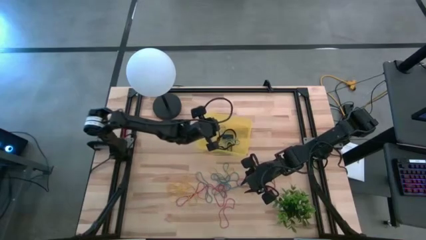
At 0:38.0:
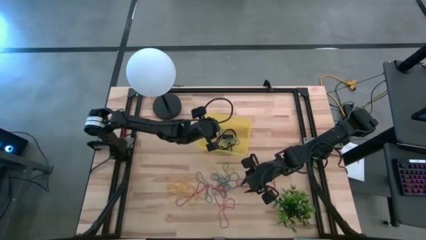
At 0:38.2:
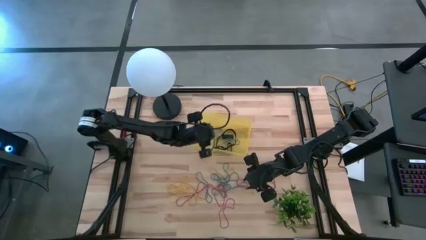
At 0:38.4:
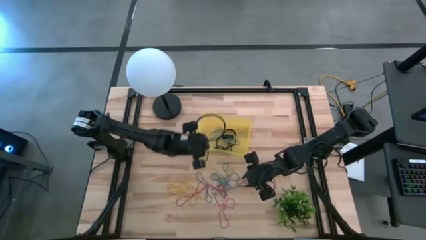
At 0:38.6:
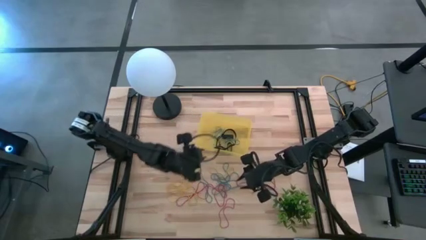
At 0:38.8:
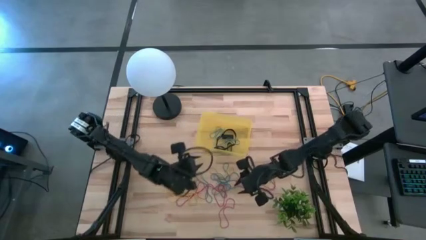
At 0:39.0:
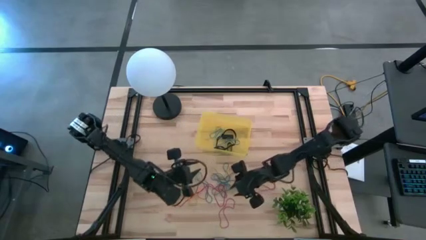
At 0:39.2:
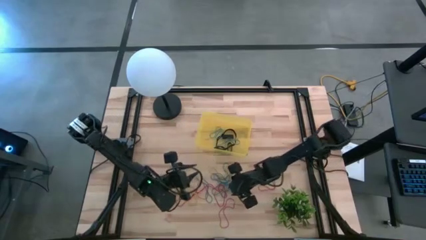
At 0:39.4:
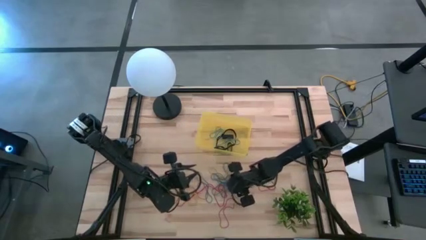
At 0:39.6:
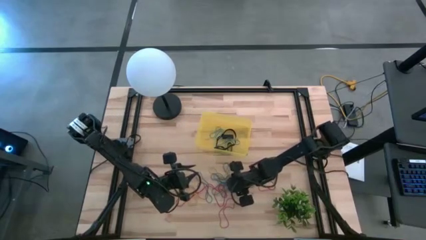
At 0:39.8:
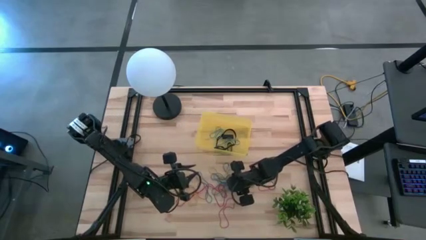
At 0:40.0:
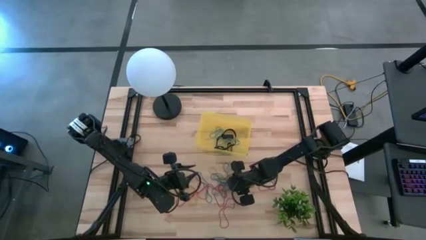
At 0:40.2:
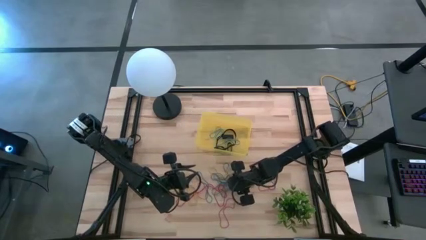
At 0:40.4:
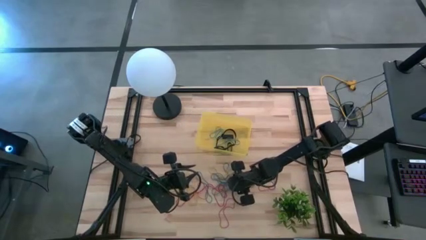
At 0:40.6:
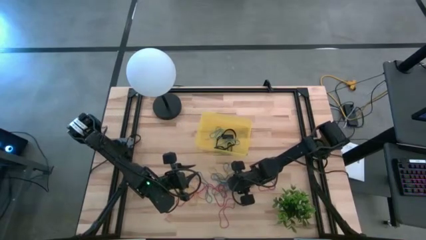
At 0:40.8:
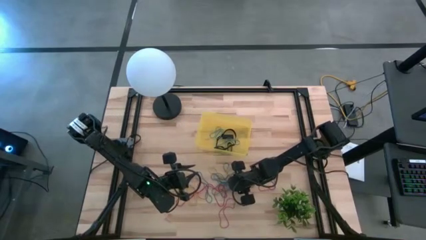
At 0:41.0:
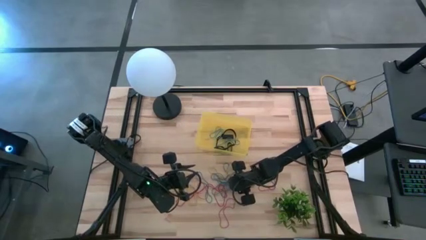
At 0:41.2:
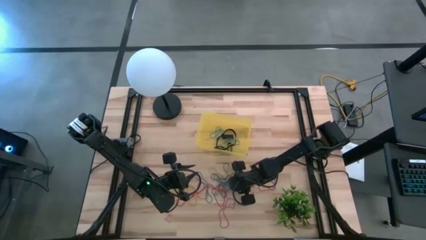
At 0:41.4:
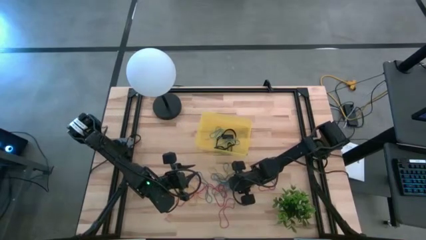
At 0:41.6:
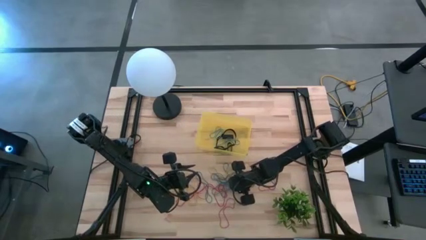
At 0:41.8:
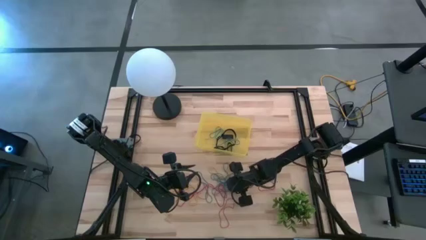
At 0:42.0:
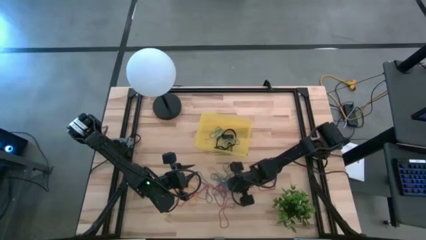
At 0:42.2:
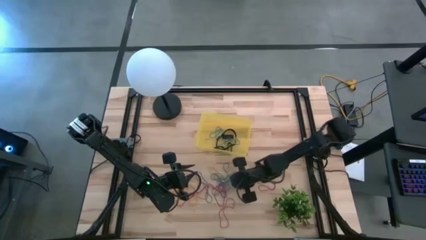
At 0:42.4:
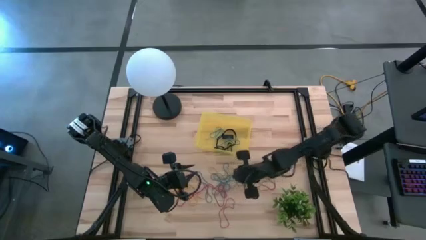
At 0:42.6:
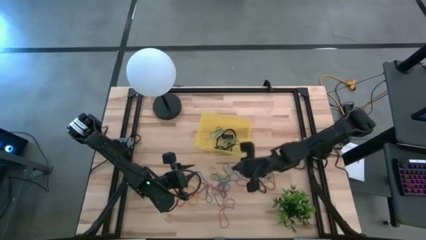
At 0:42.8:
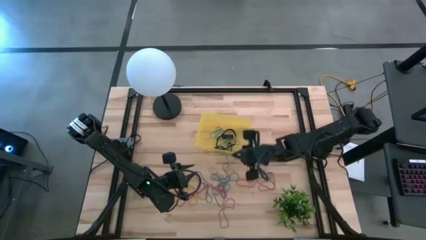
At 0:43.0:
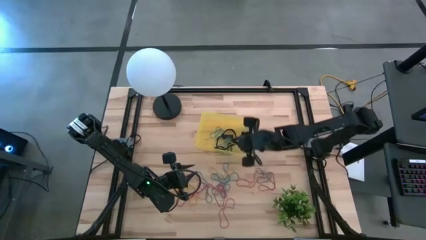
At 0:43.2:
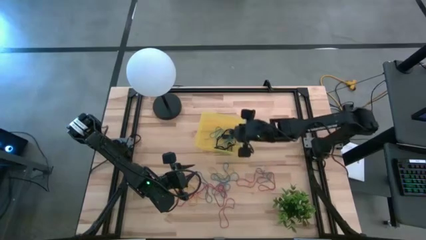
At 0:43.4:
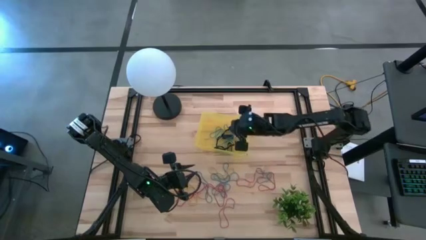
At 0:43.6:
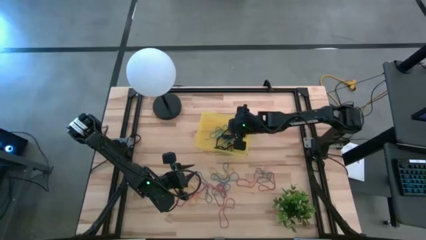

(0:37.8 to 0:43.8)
Task: Pick and place rubber bands into bin
Put the blue rubber band into the yellow bin

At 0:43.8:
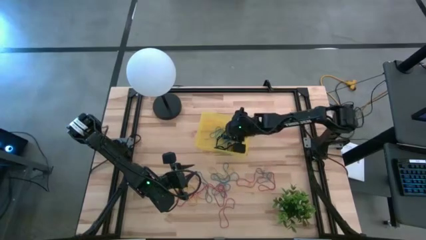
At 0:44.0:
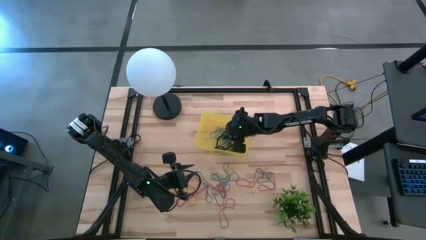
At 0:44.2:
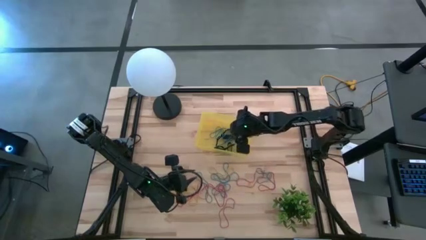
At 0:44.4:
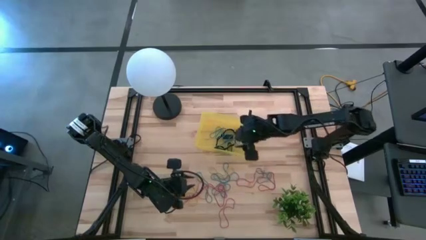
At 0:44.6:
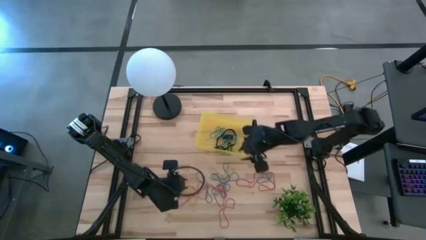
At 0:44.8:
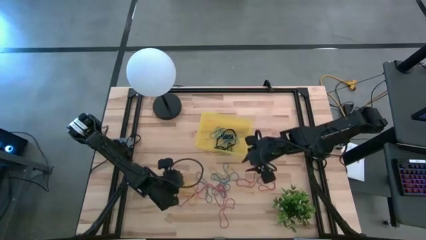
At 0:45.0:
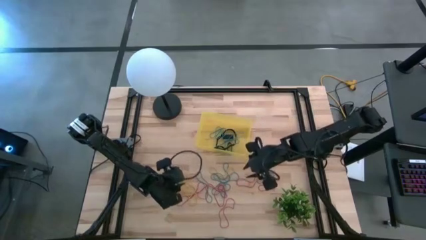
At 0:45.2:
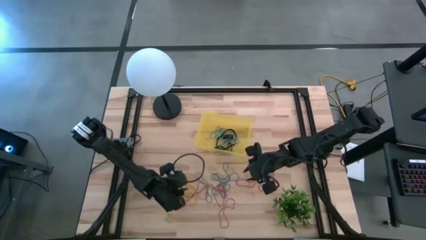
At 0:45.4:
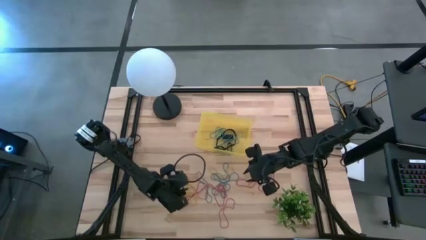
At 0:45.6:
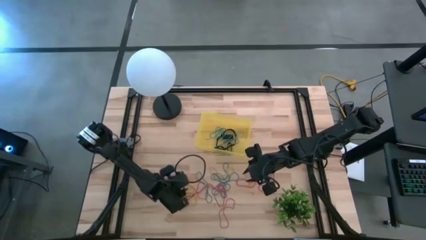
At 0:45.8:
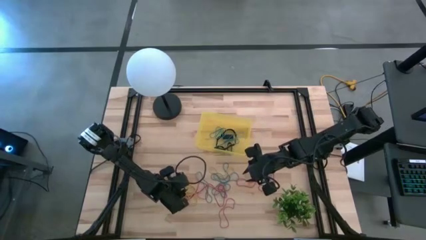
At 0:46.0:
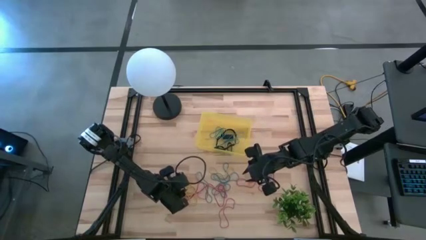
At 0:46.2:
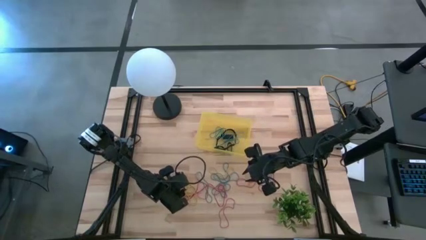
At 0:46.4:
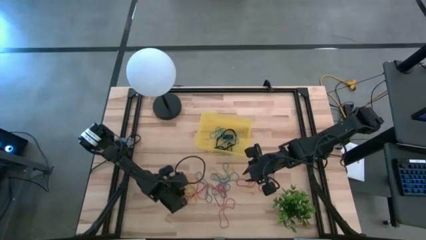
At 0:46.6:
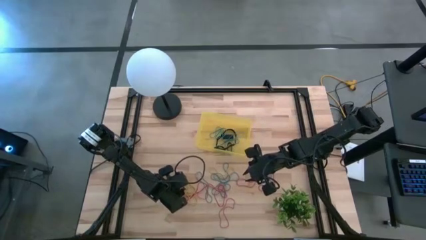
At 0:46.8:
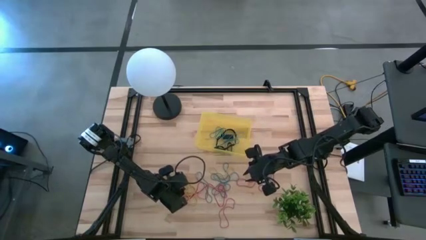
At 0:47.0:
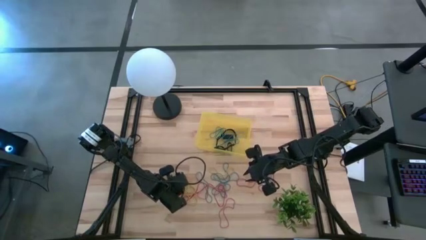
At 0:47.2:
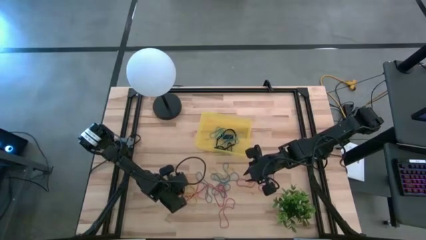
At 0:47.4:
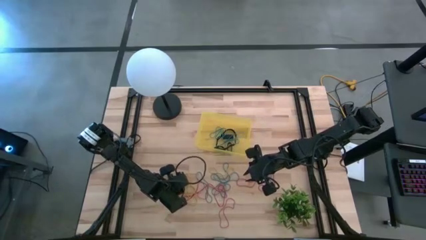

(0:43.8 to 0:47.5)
Put the yellow rubber band into the yellow bin

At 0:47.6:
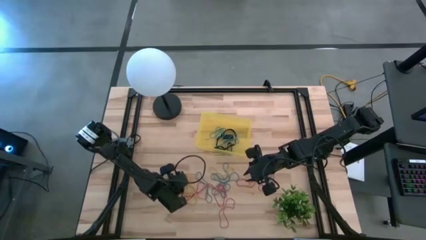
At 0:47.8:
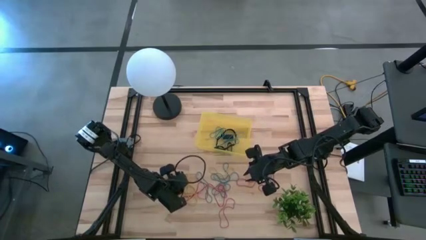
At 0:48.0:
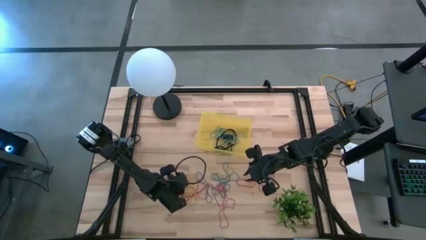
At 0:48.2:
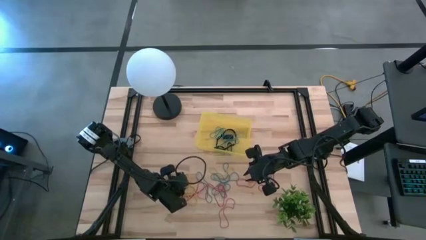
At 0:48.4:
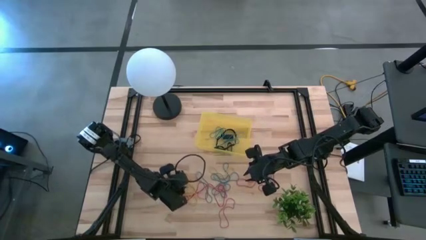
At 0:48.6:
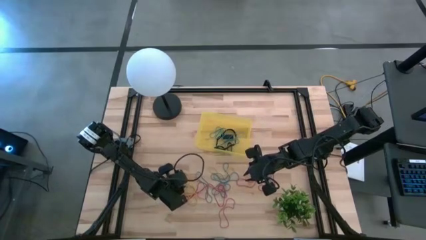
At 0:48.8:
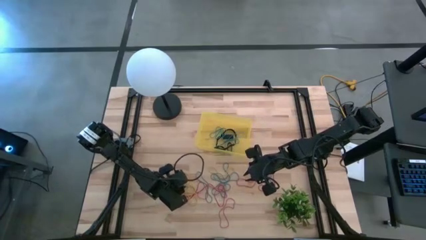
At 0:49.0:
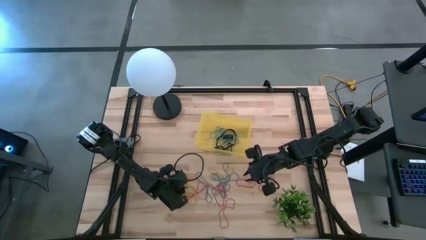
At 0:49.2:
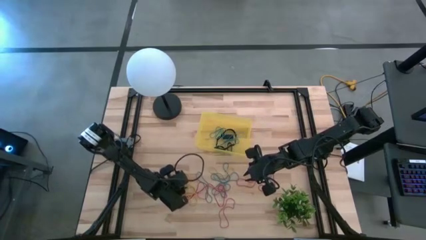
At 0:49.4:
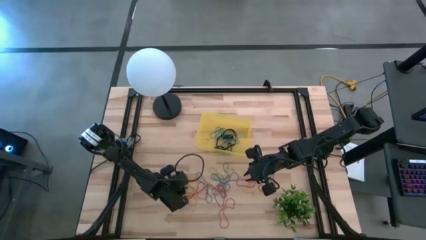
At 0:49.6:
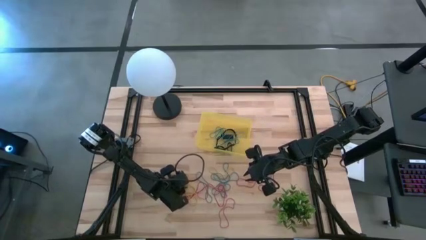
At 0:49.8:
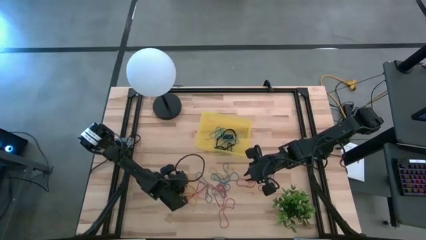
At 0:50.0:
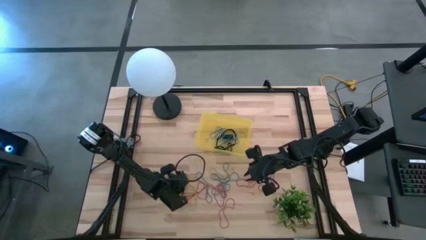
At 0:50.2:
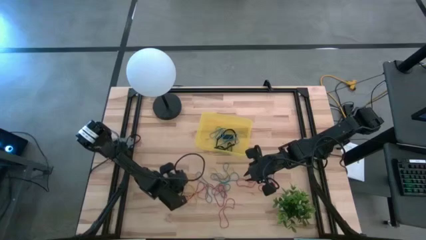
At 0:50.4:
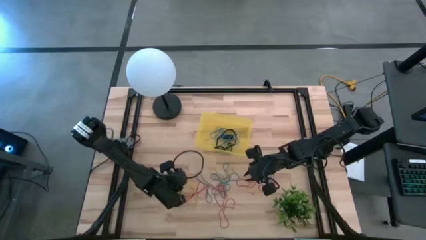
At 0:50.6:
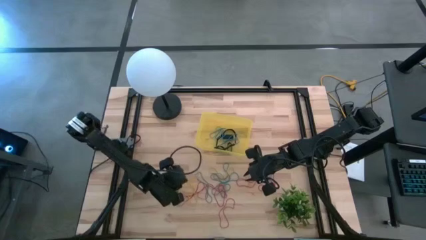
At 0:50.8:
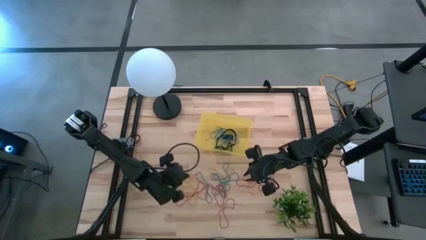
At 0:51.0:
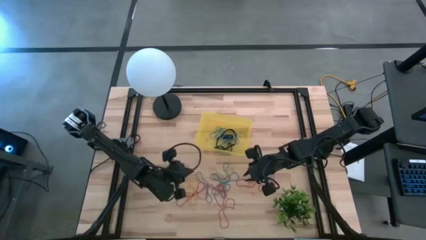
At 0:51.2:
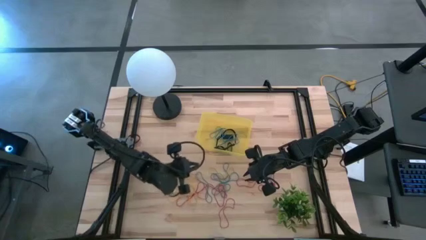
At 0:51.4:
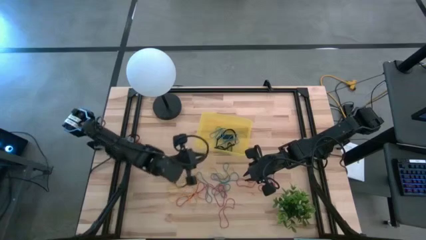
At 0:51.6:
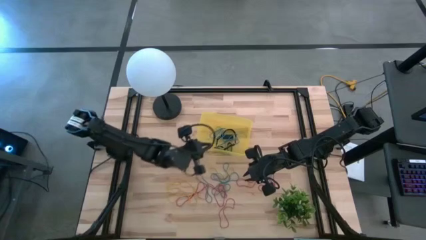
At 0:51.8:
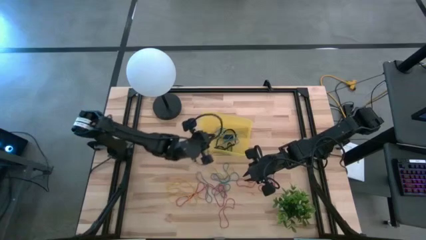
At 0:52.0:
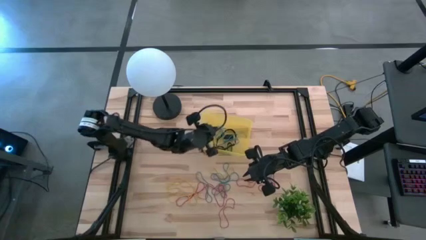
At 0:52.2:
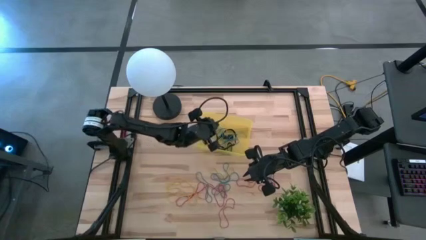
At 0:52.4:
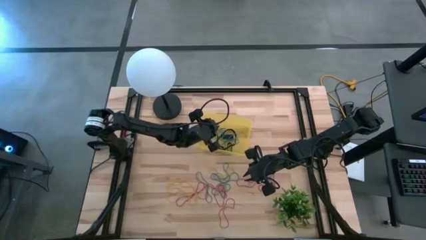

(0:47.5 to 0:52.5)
Put the yellow rubber band into the yellow bin

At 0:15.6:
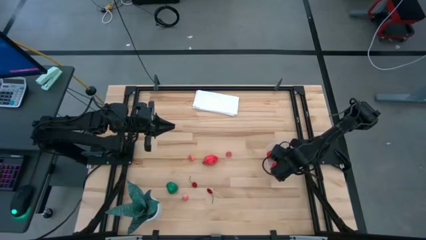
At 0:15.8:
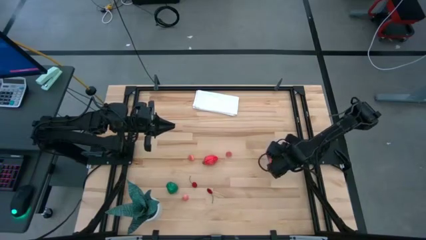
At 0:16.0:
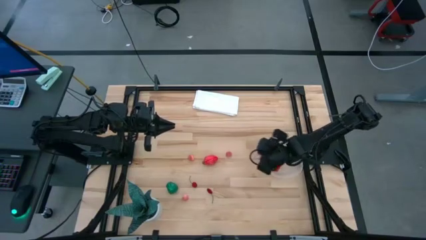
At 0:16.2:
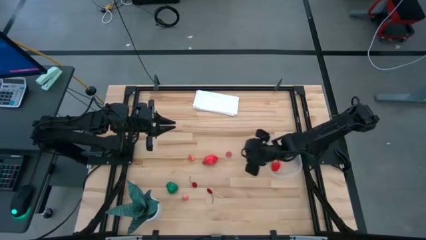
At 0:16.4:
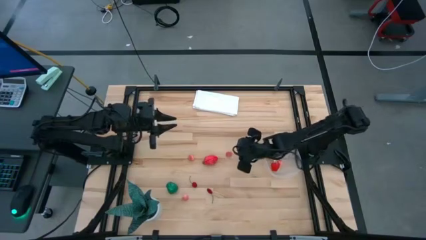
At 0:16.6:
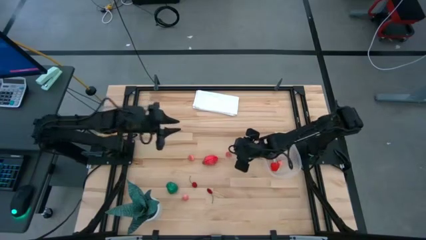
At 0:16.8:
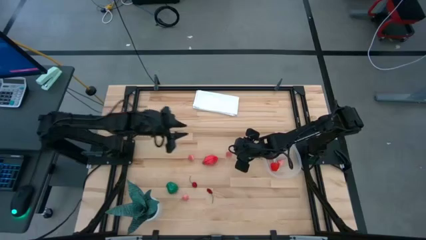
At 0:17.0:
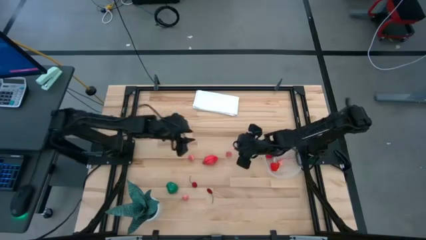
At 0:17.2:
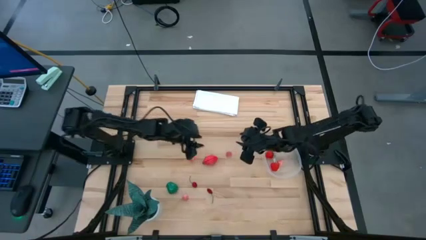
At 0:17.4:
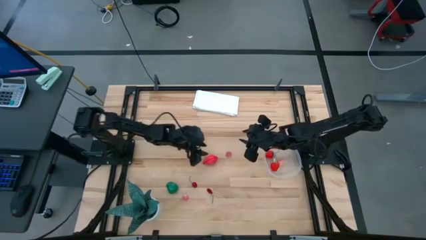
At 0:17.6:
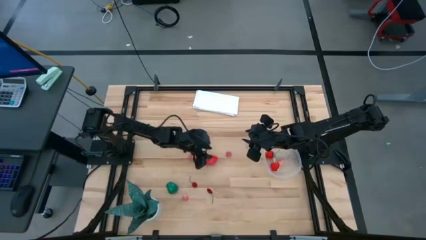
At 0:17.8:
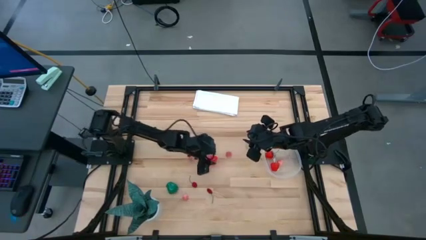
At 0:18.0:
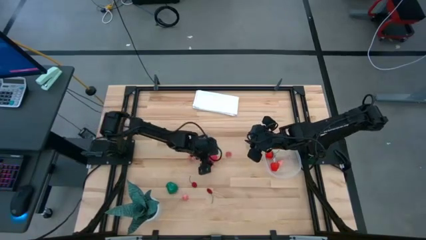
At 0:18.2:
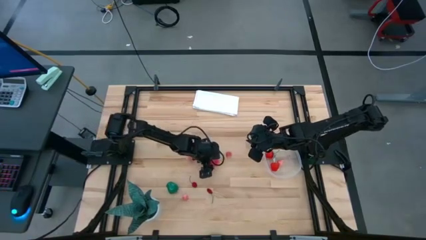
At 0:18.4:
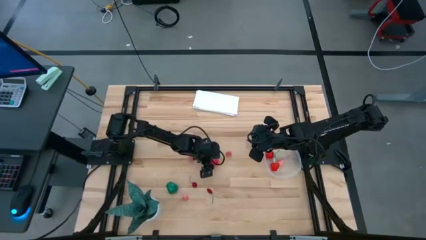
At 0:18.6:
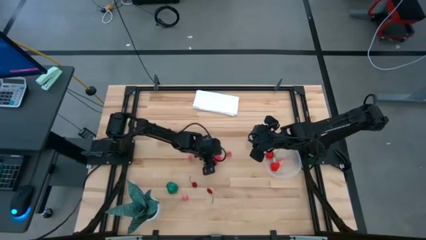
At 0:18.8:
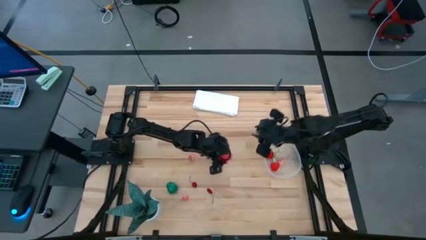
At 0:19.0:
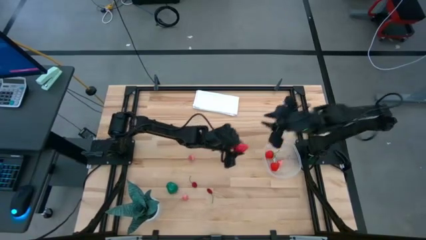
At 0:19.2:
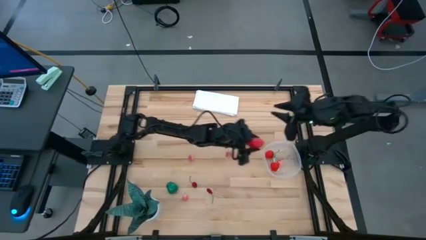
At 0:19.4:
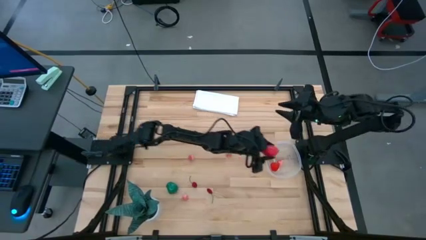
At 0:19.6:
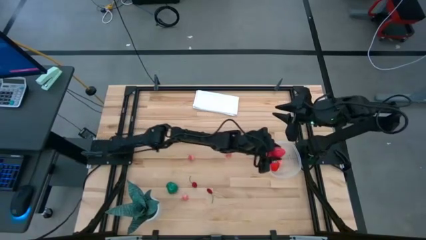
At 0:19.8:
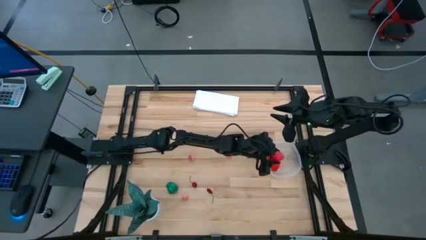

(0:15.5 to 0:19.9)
Task: Pick and placing Produce into tupperware
Put the red dragonfruit into the transparent bin
